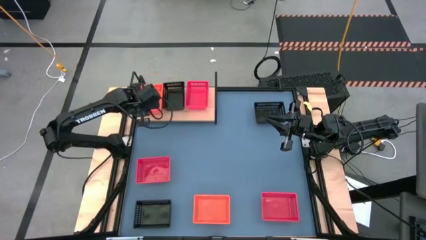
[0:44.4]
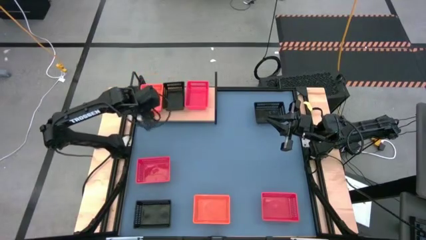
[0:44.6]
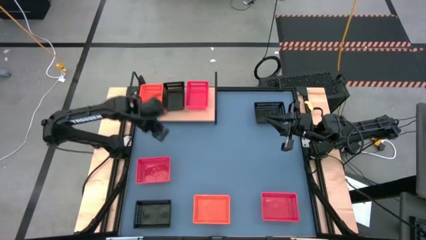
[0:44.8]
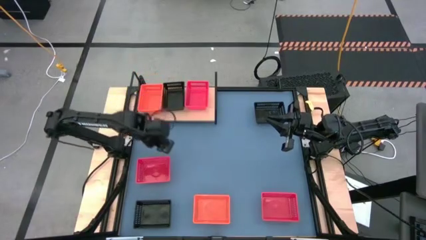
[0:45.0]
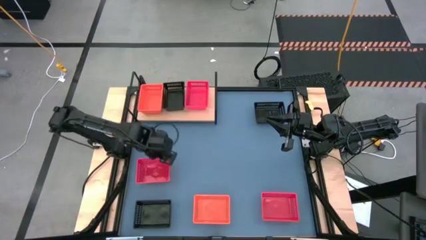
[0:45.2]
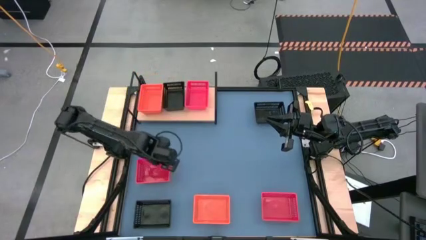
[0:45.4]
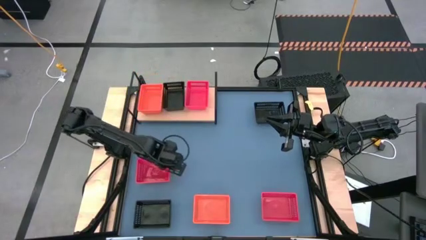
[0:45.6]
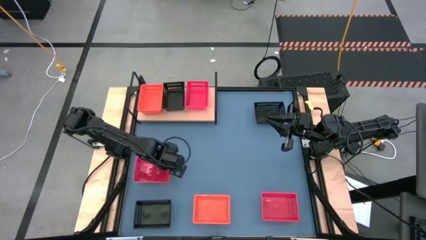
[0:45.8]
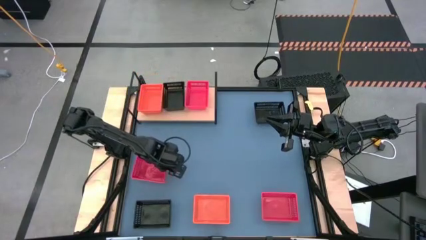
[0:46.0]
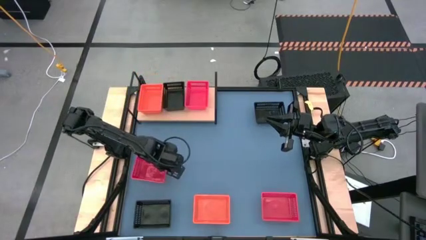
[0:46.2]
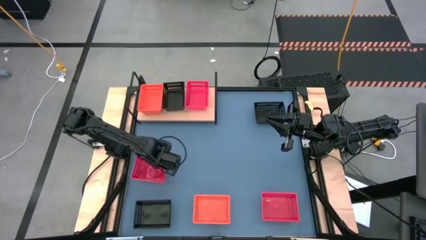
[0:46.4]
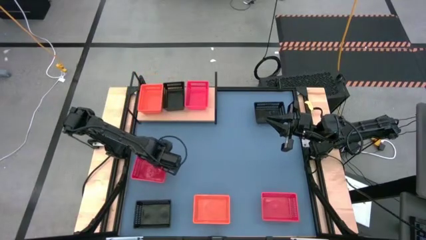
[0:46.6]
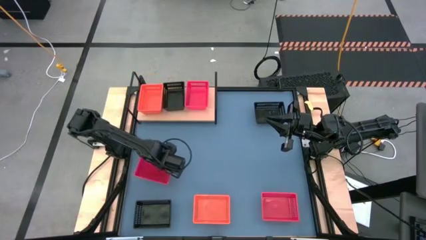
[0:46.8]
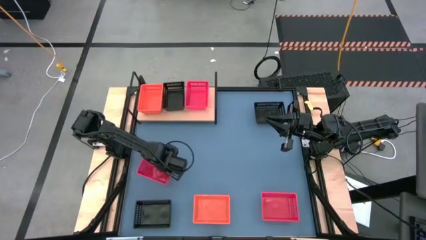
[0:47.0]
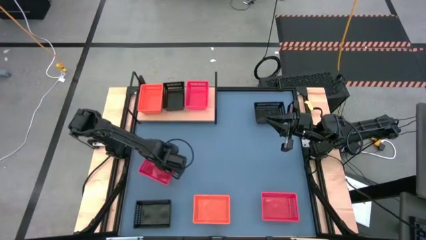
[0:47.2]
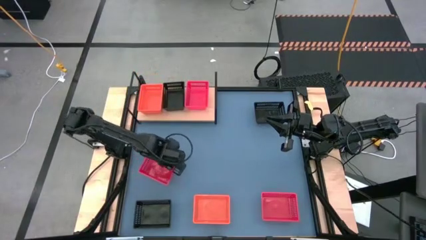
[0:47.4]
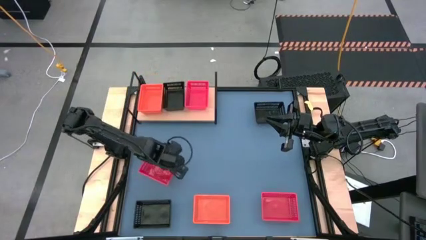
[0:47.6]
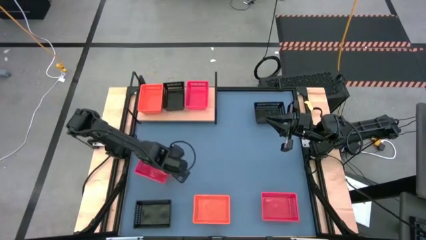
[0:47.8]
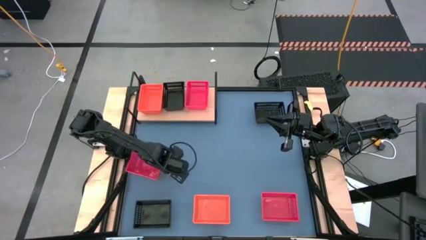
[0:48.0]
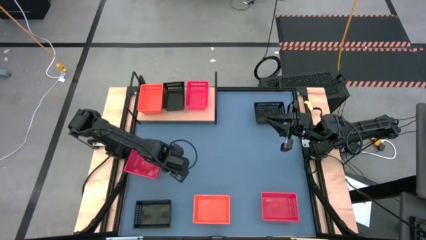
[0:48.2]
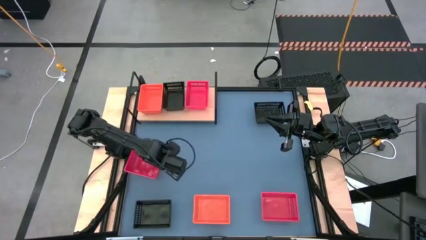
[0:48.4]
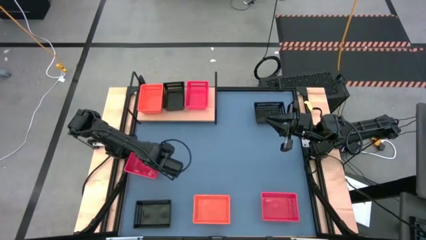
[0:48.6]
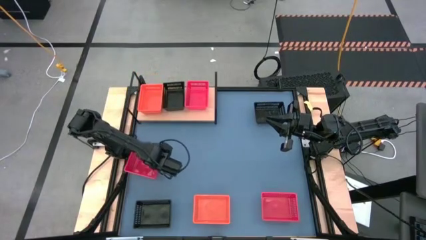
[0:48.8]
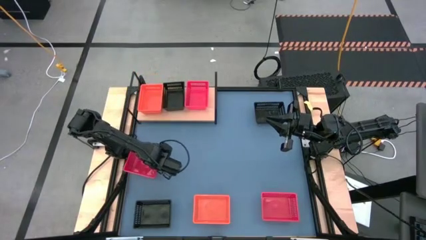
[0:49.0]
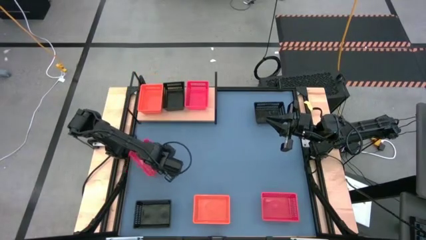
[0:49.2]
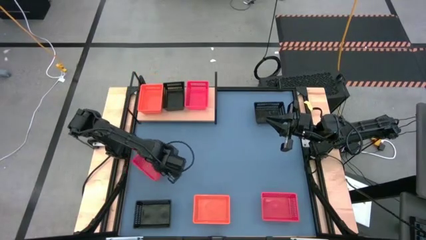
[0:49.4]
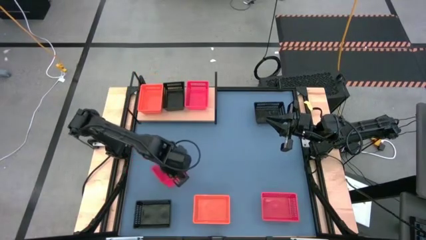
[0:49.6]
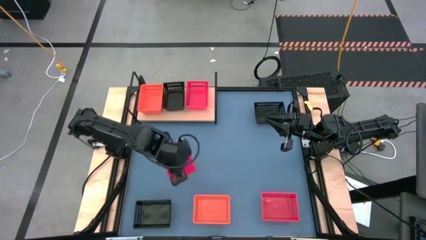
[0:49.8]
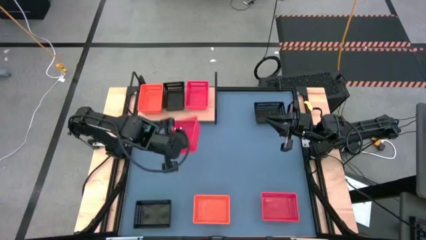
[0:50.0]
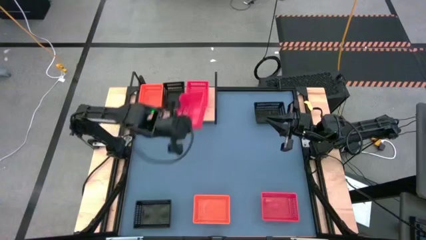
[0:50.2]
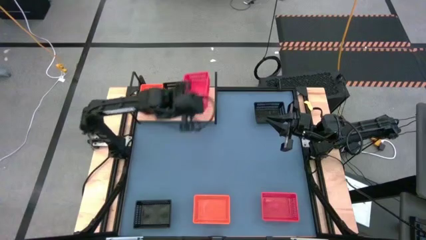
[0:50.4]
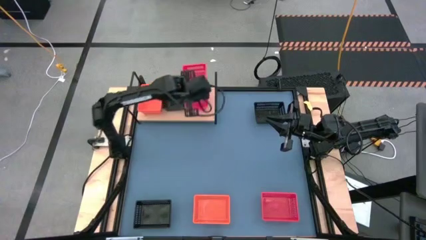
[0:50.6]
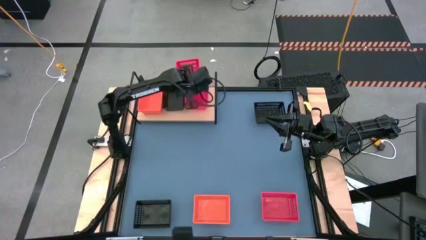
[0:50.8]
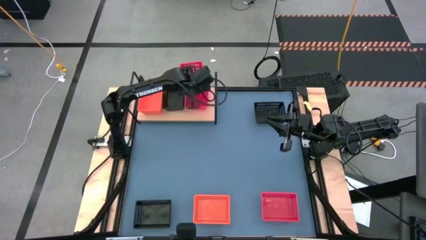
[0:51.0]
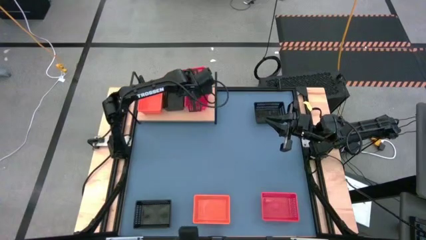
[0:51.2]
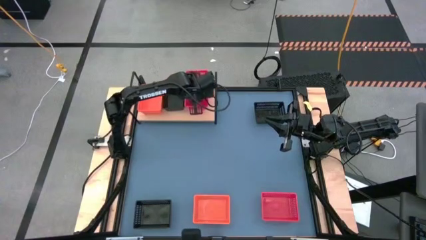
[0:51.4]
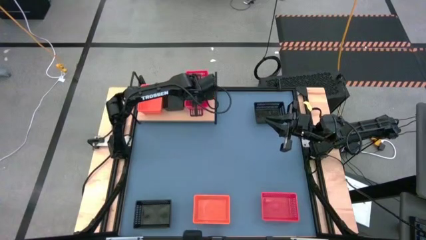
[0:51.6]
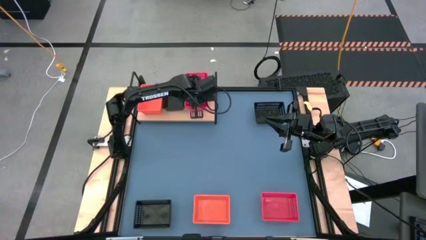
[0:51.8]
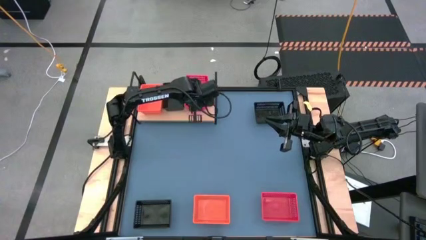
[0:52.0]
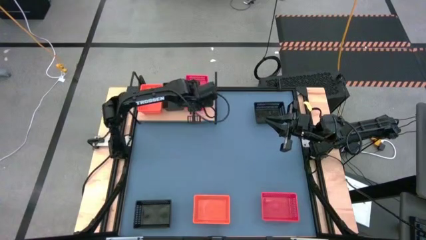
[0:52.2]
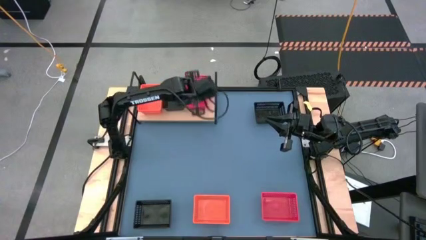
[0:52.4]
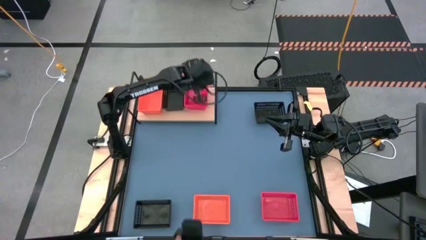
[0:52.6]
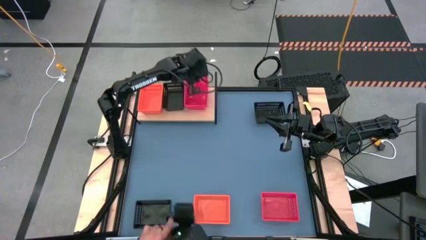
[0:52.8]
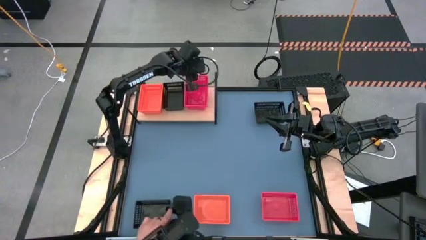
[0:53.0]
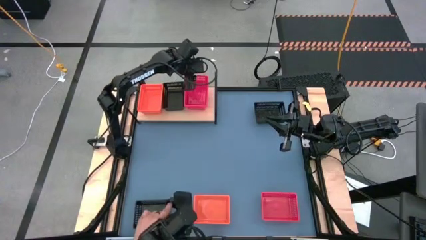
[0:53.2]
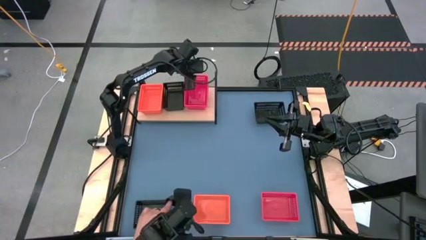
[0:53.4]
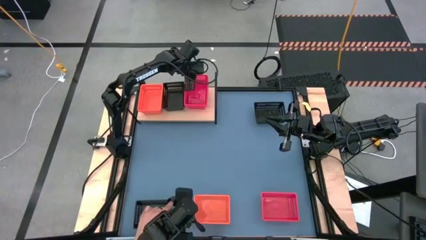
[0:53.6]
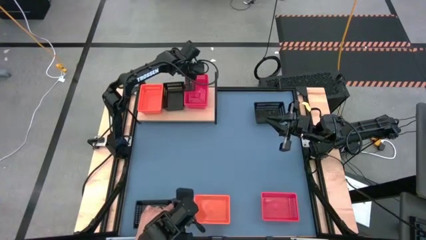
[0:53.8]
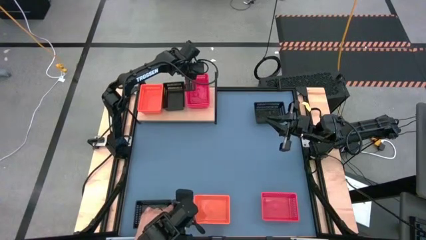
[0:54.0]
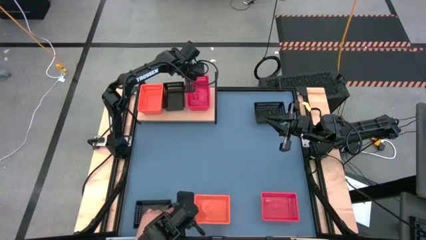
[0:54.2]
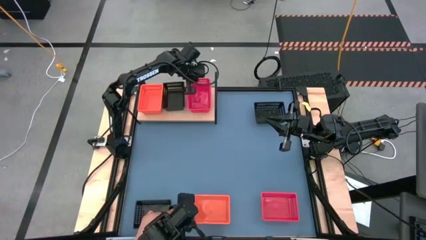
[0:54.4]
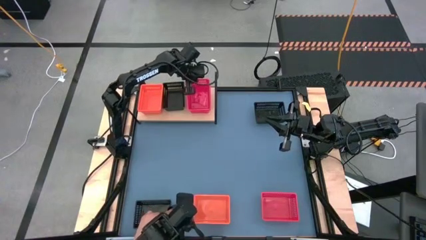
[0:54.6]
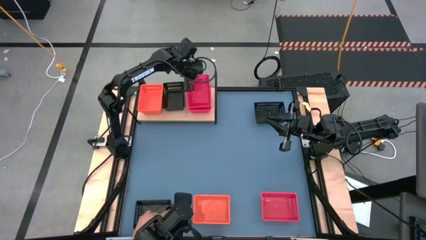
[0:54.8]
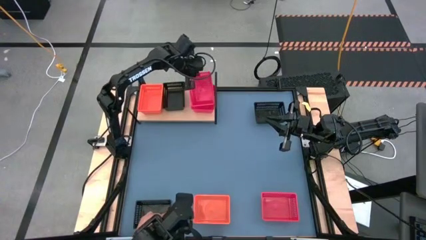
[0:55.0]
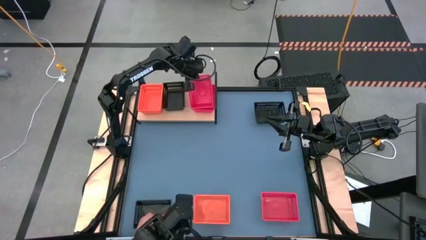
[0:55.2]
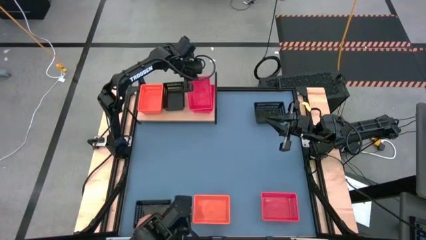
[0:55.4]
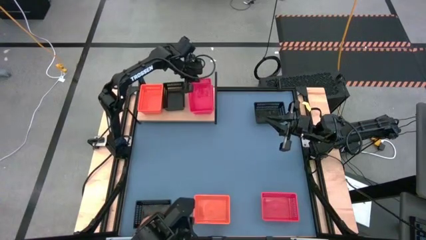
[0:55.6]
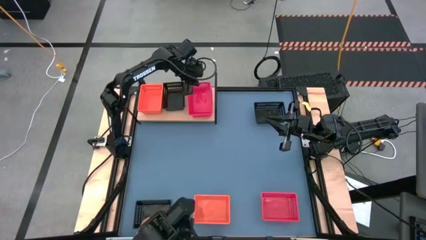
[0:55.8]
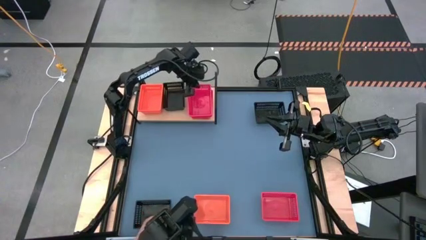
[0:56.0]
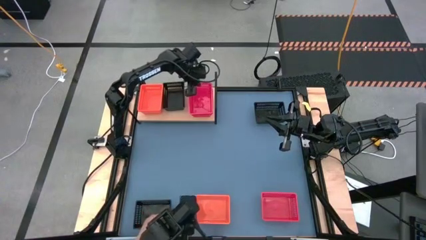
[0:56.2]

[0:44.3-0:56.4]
Task: Stack baskets on shelf by color
Stack the left red bin on top of the other red bin on the shelf

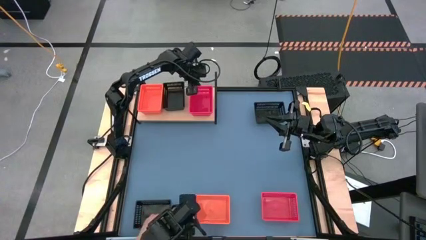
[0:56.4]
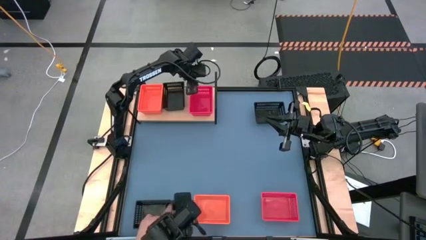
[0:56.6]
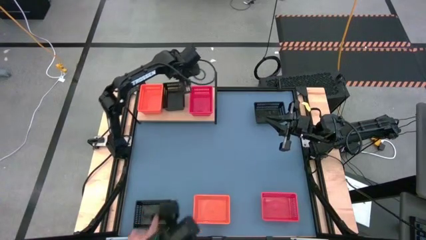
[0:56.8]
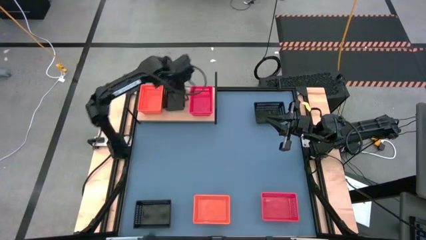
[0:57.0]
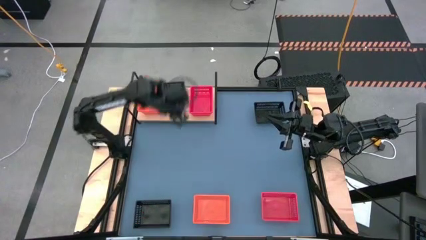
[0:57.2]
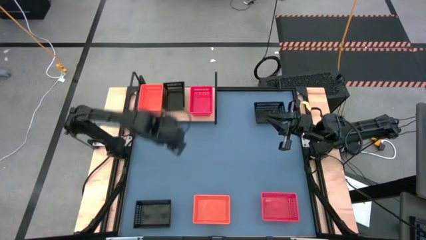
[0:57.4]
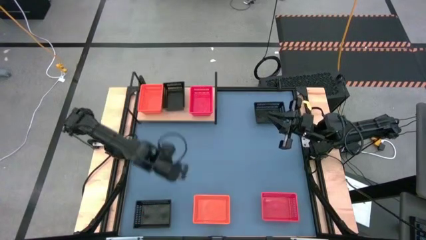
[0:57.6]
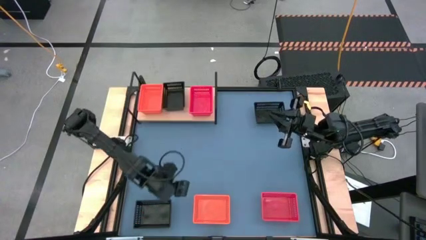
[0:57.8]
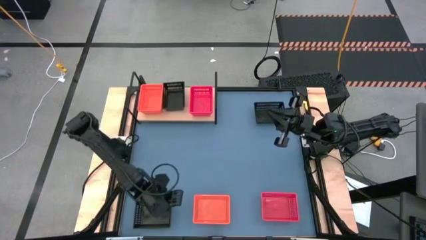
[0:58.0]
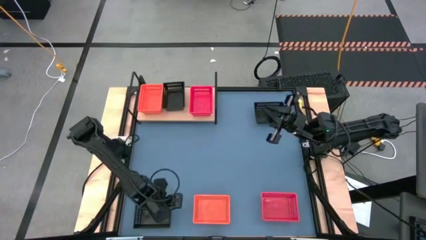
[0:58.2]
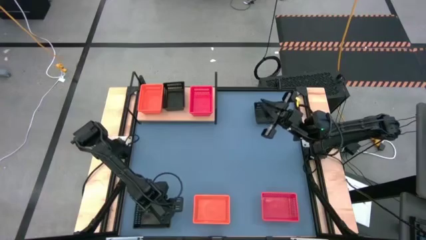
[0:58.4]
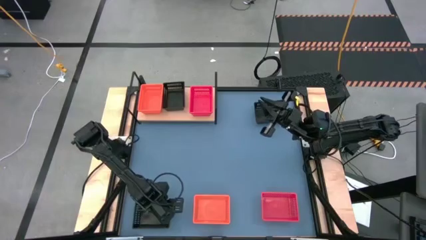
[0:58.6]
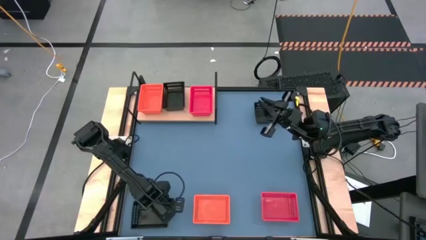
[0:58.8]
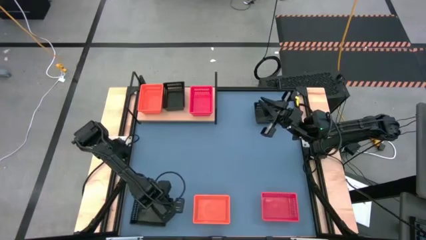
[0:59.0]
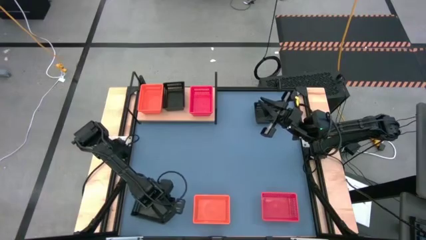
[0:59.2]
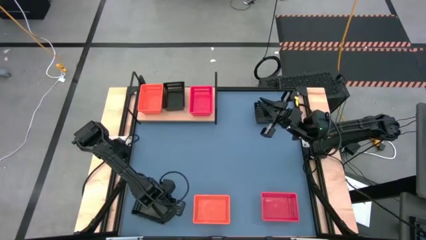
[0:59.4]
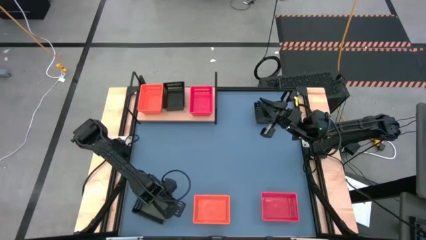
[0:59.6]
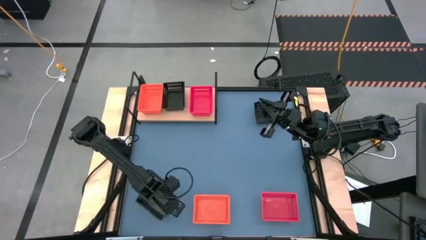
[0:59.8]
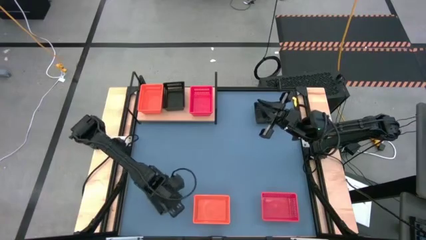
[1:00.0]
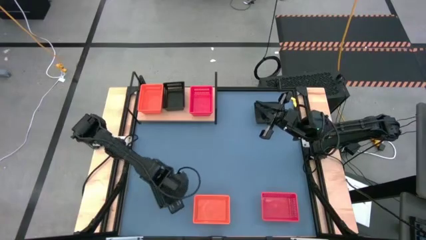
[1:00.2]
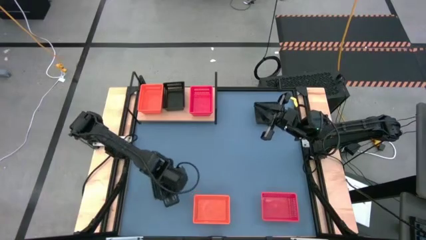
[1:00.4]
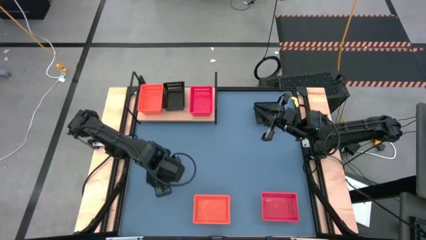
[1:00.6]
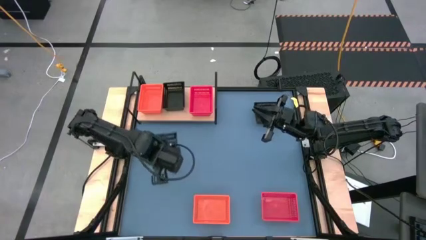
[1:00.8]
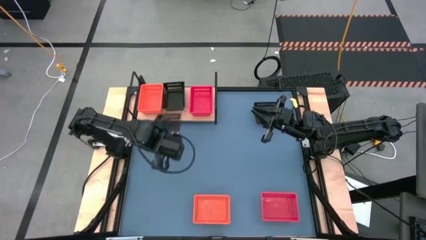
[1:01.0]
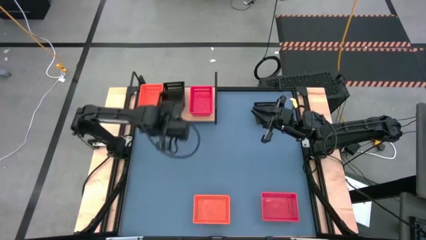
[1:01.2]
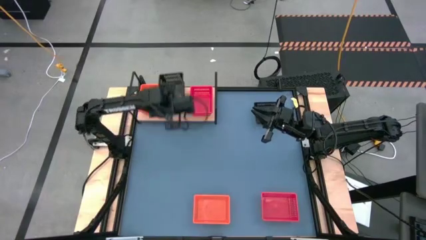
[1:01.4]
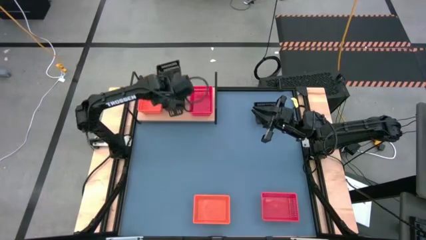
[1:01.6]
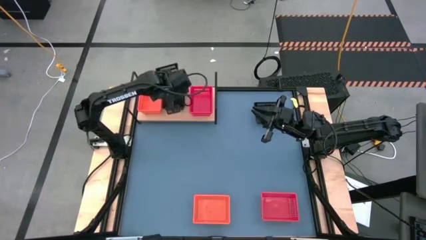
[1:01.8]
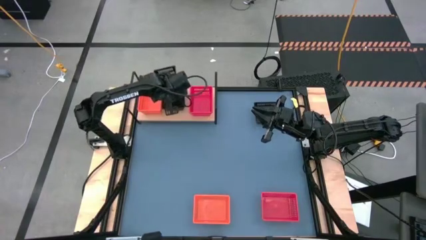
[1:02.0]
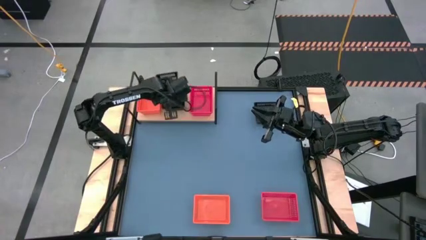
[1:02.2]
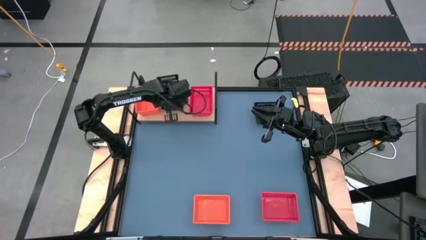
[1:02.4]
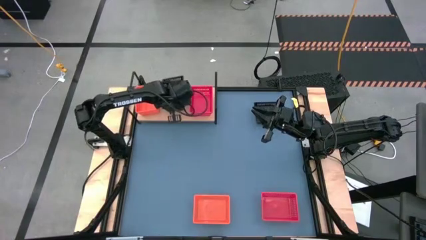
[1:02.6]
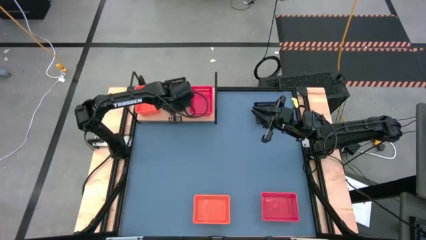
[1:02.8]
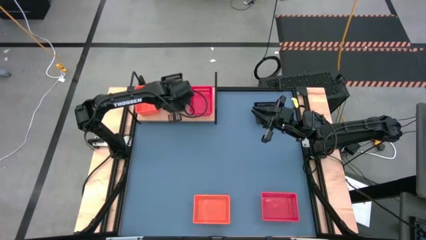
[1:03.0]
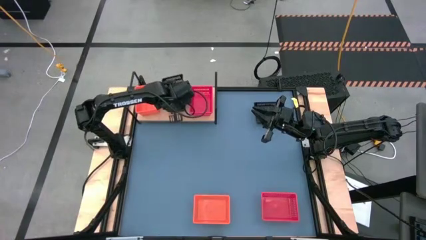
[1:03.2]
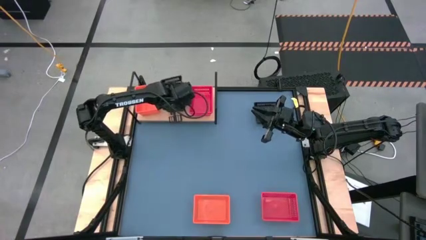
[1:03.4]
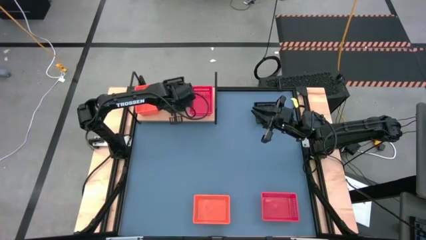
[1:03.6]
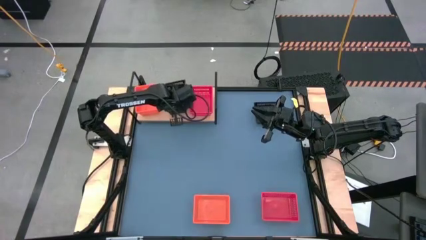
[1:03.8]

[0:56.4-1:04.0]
Stack the bottom left black bin on top of the other black bin on the shelf
